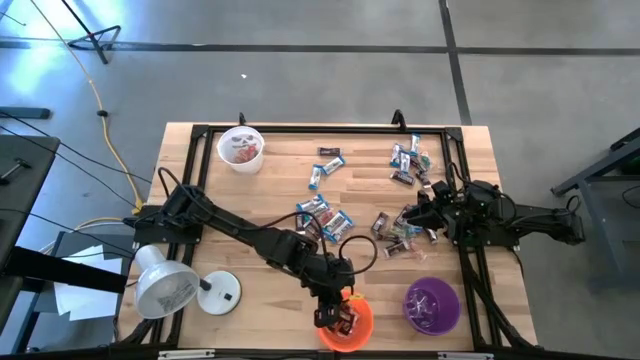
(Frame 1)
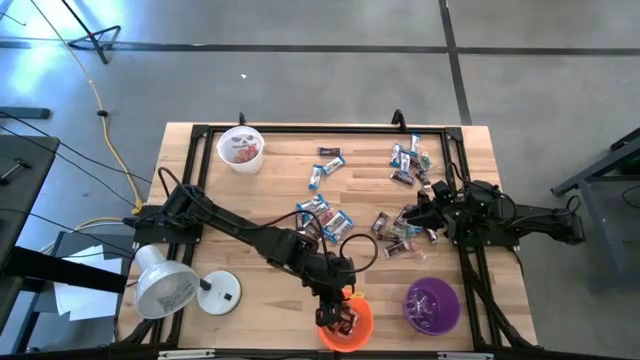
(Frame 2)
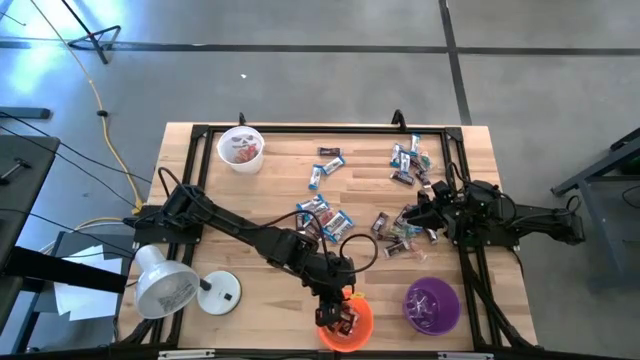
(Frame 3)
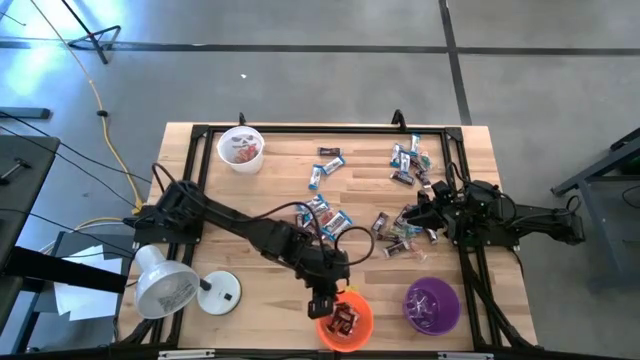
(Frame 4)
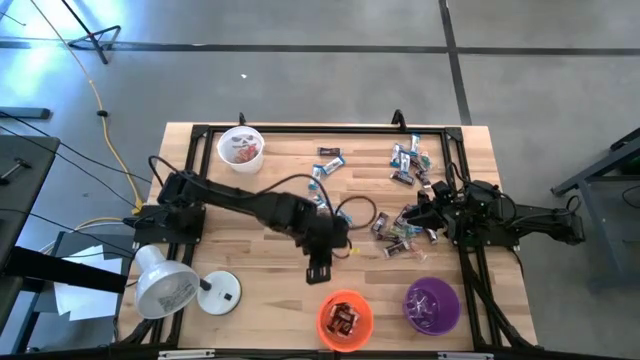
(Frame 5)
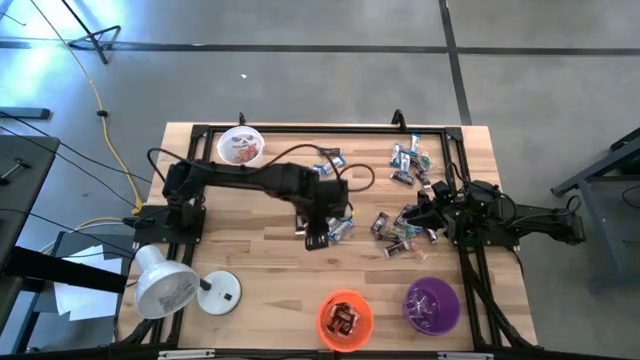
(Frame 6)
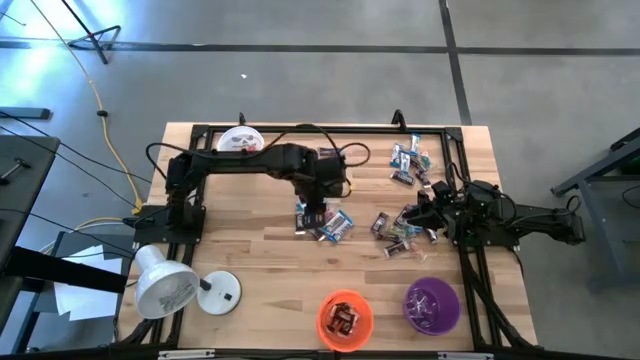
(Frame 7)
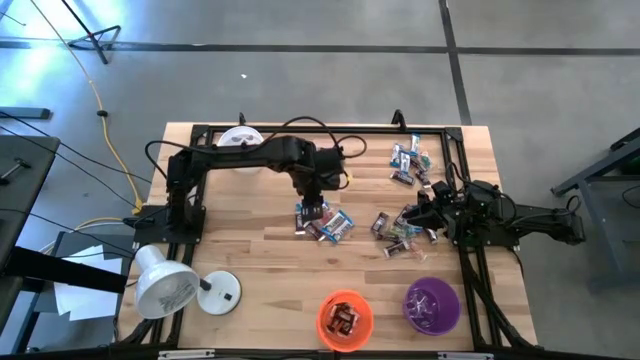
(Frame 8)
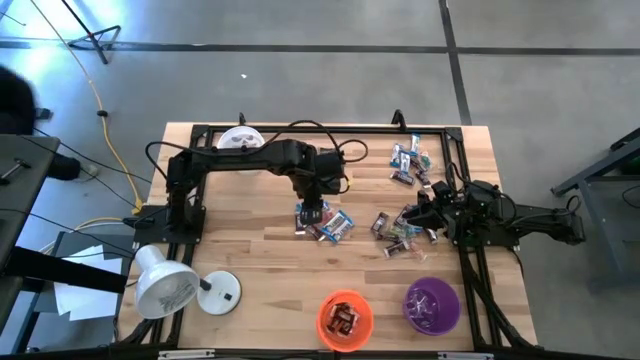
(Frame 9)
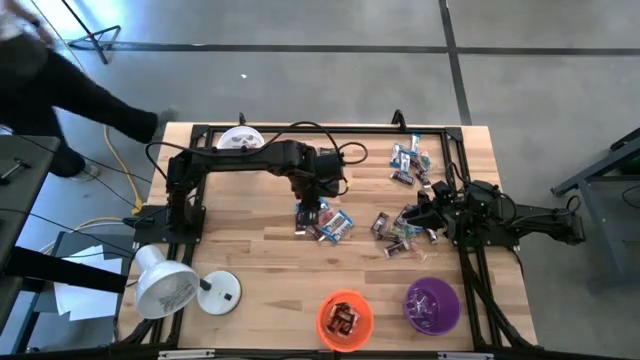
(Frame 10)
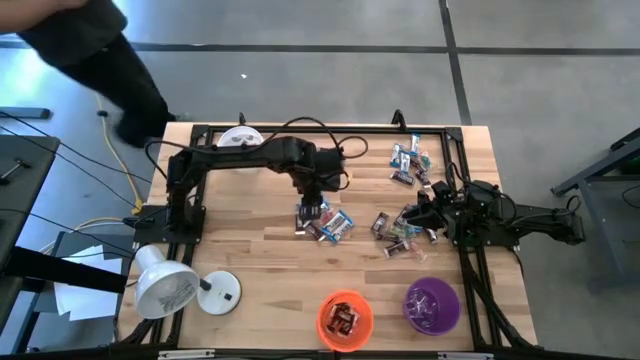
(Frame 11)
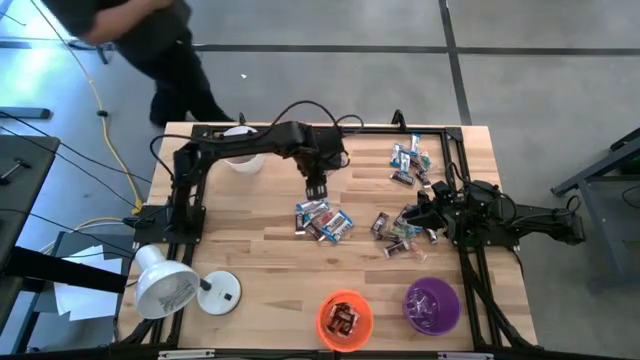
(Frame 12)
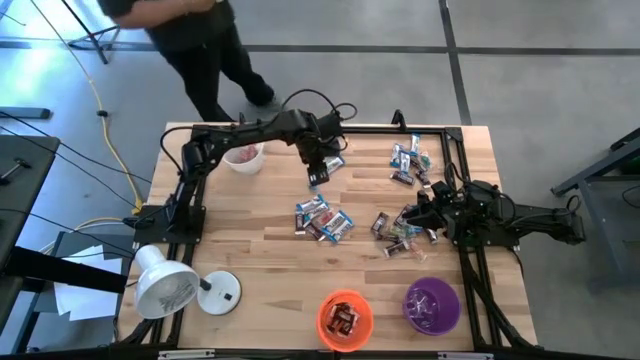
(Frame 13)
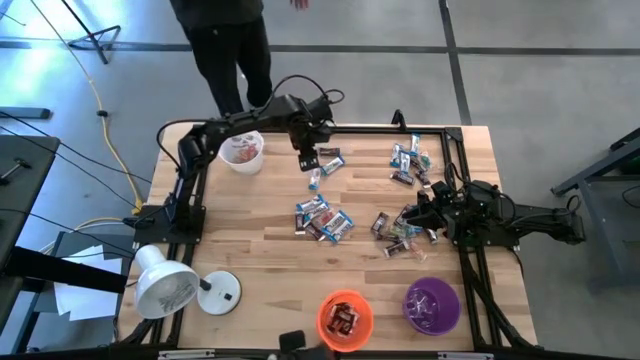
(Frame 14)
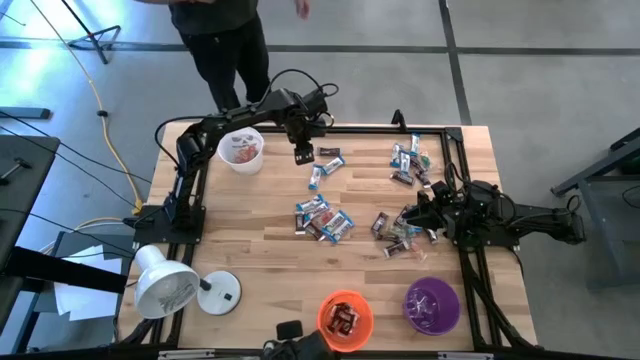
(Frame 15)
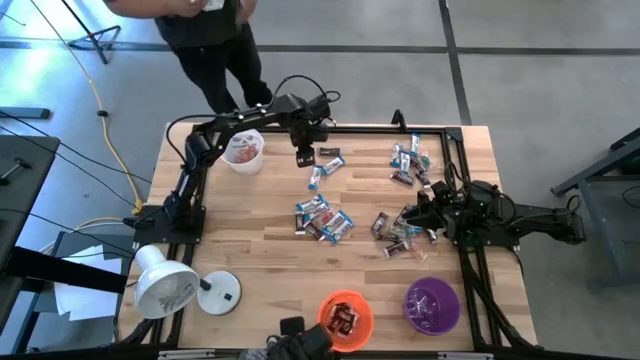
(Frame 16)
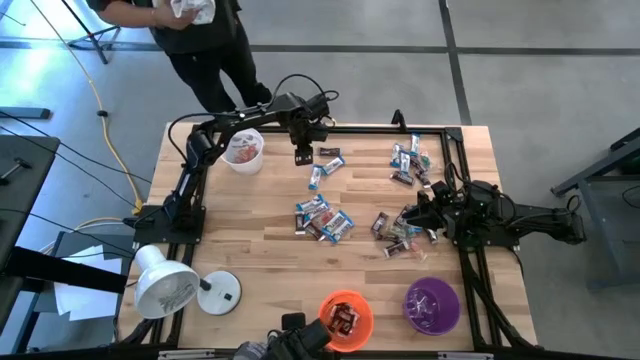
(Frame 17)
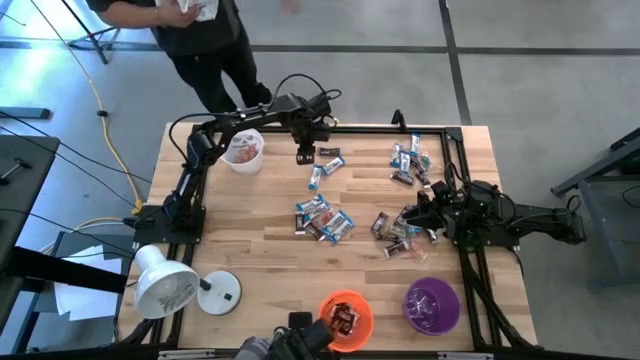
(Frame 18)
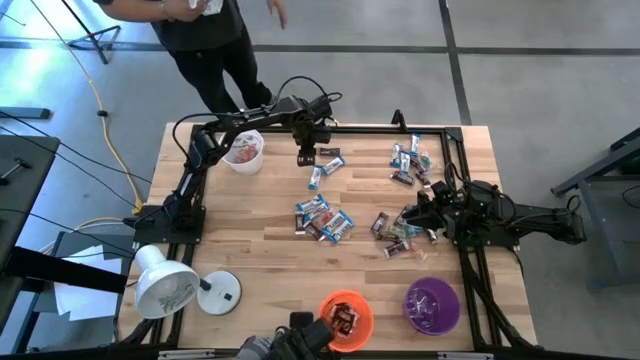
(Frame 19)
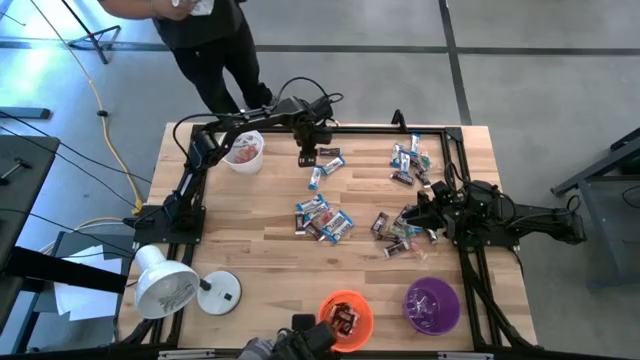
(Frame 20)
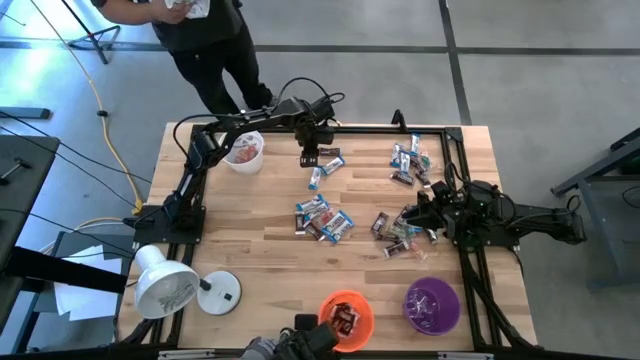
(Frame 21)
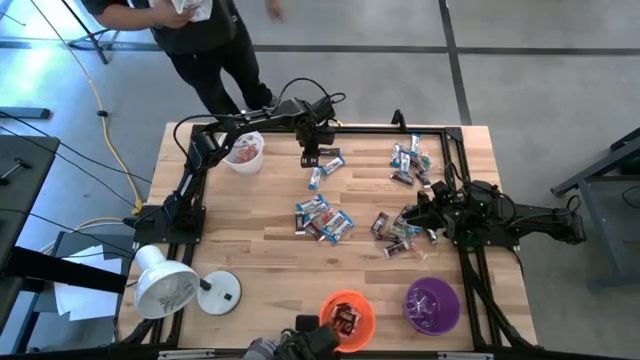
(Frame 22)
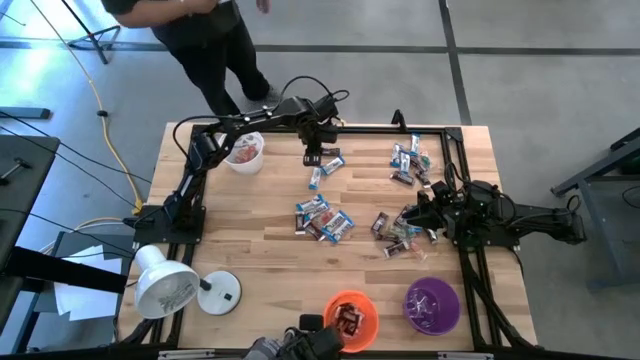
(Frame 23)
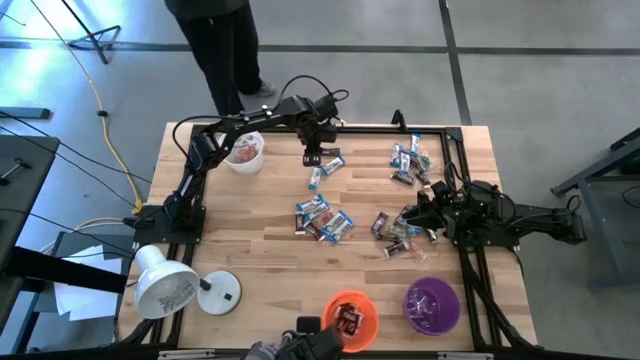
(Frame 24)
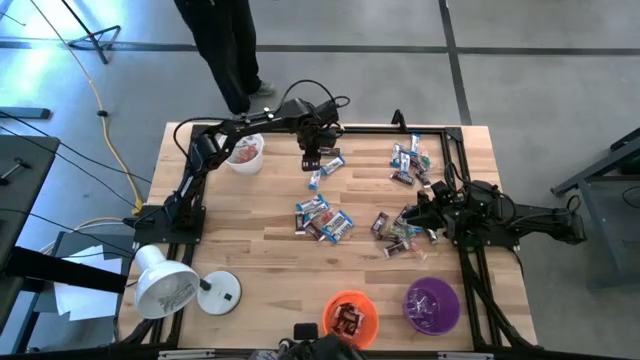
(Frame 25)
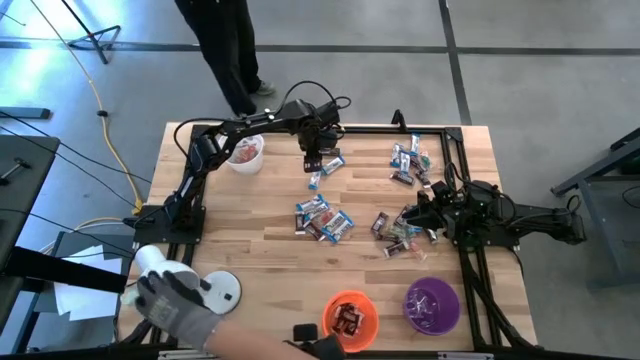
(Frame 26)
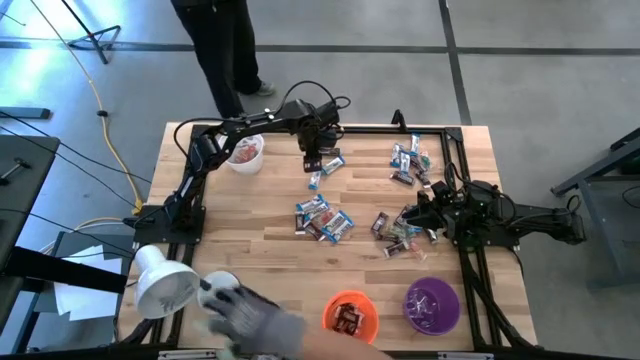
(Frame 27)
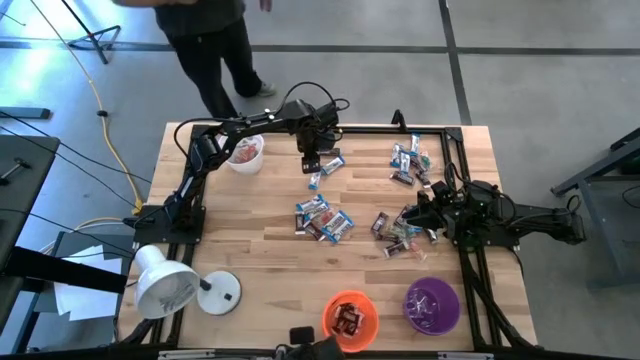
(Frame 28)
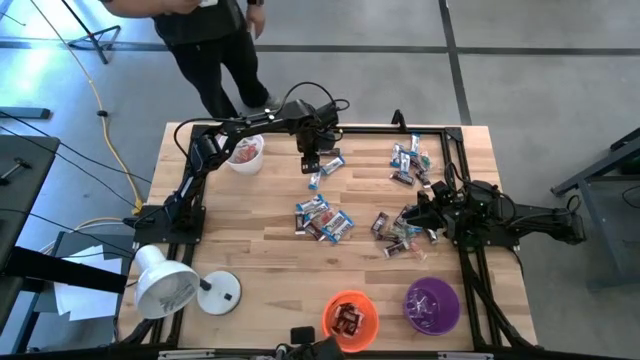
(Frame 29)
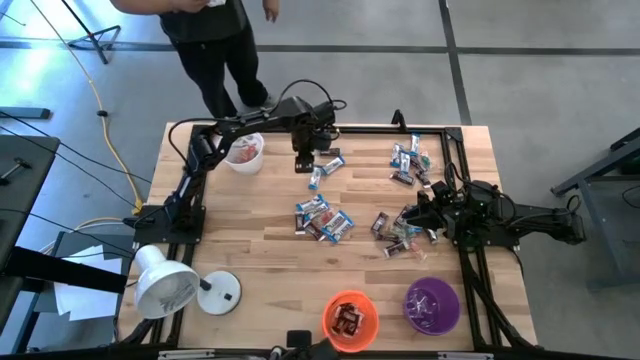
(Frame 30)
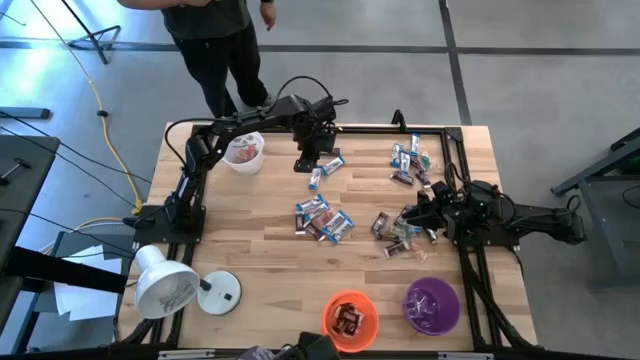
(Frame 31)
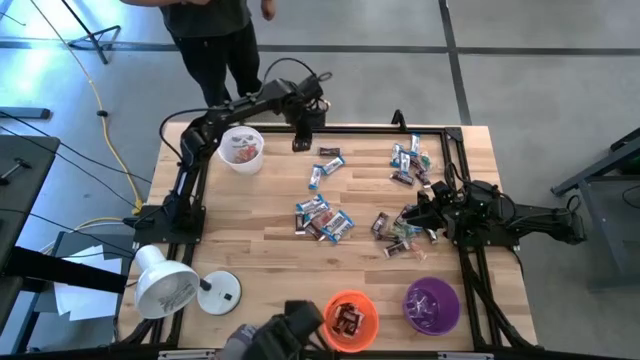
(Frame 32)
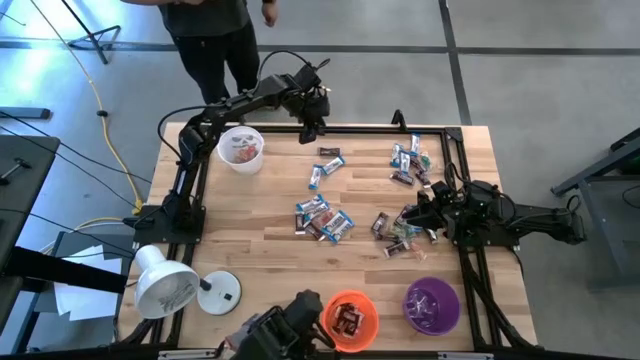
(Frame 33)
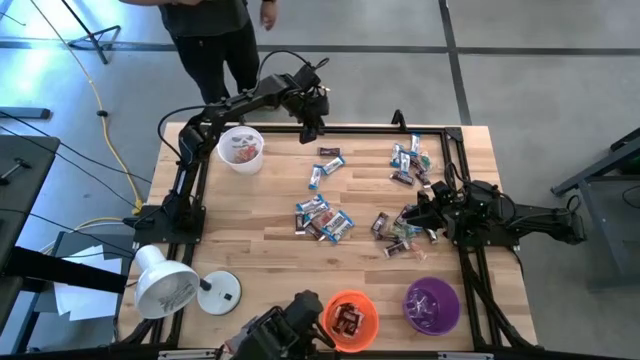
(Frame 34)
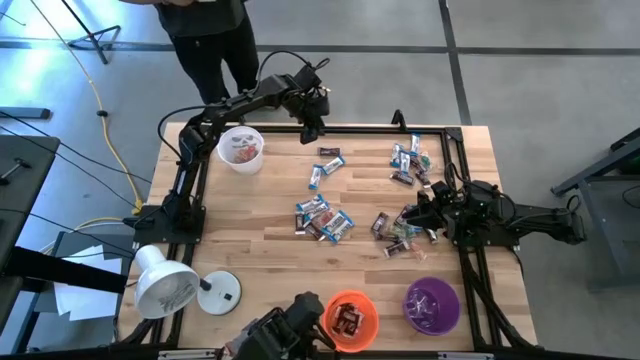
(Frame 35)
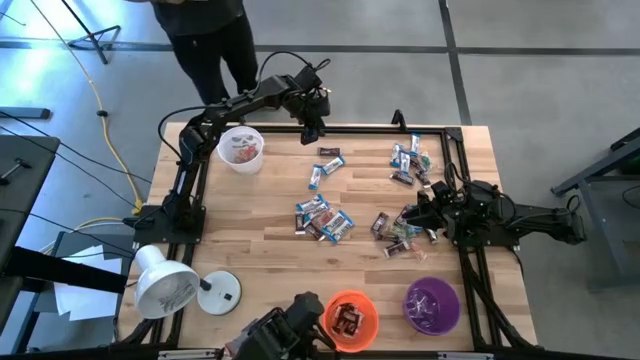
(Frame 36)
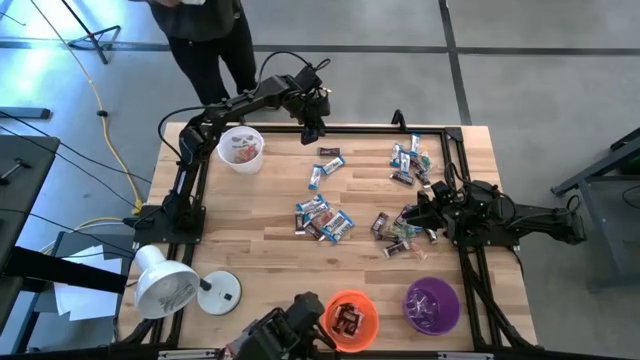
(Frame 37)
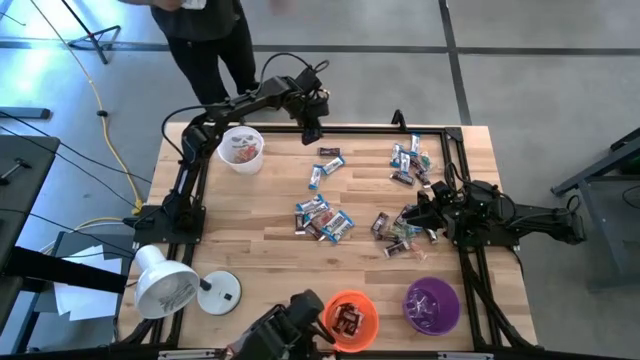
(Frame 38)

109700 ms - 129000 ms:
Task: Organize candy in baskets
Put the brown chocolate into the orange bucket

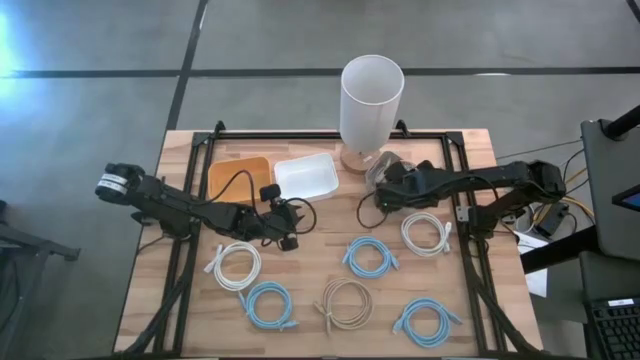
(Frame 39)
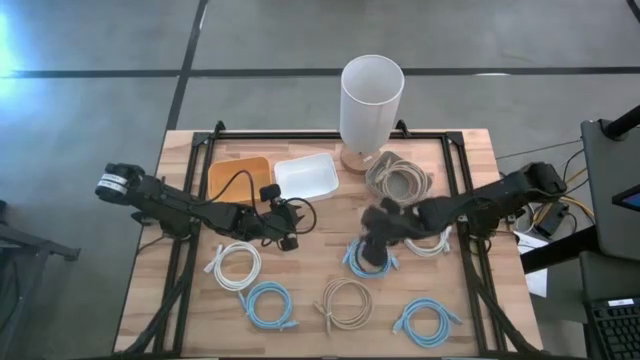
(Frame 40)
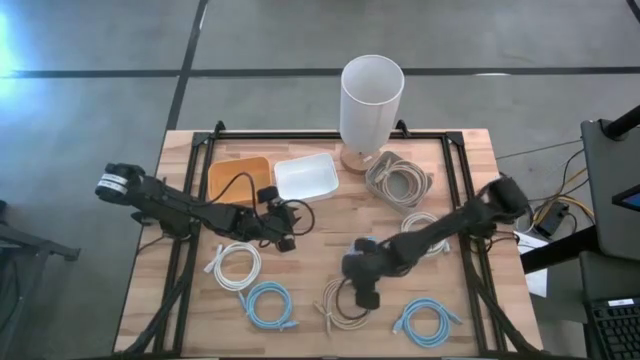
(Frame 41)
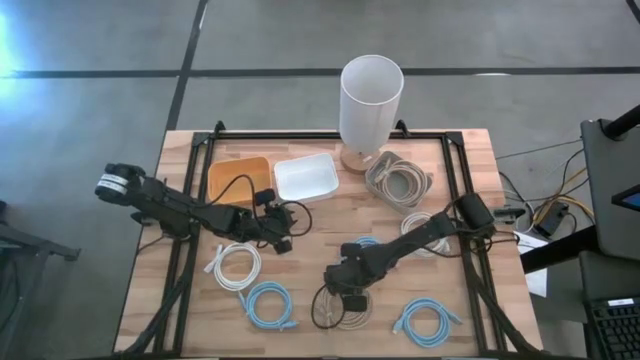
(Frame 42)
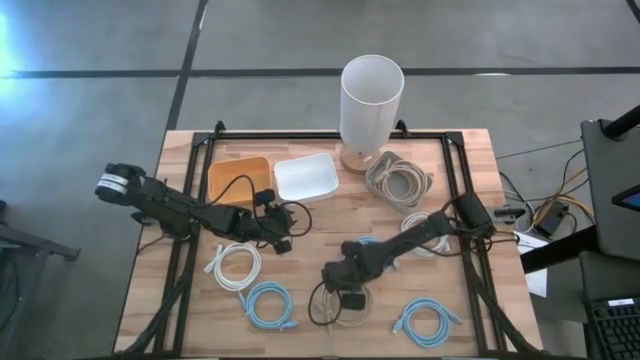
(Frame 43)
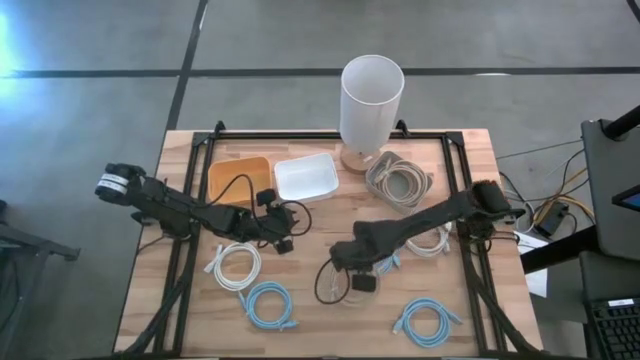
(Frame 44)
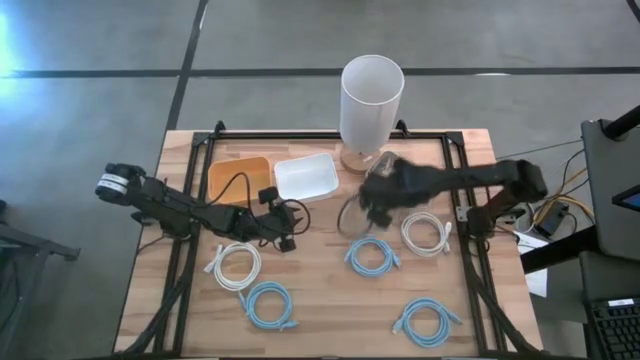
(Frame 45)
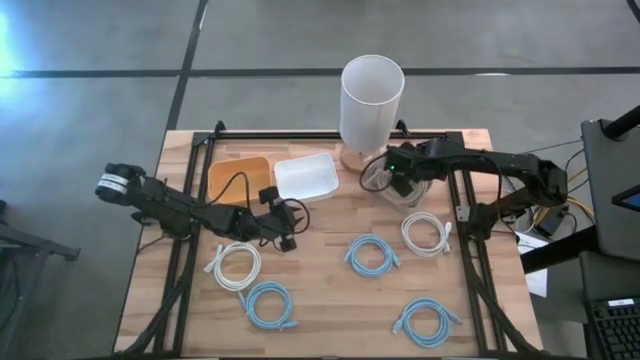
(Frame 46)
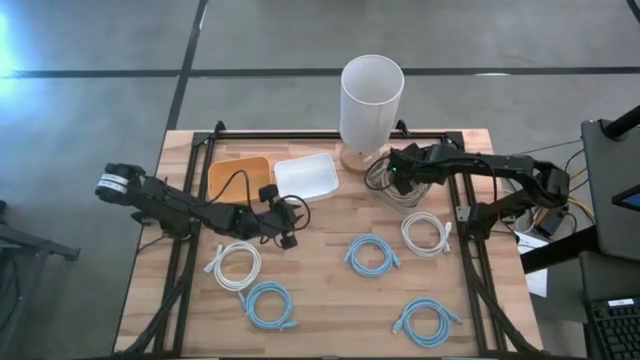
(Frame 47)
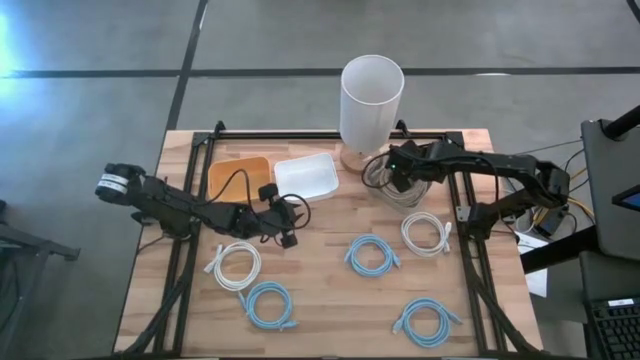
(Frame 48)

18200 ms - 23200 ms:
Task: Pick & Place USB Port
Put the brown USB cable into the gray bin
